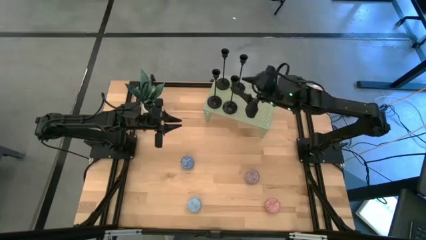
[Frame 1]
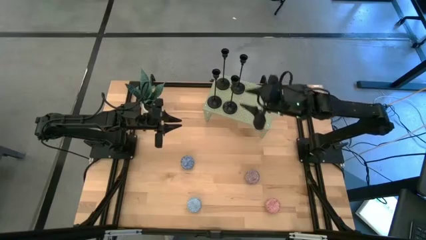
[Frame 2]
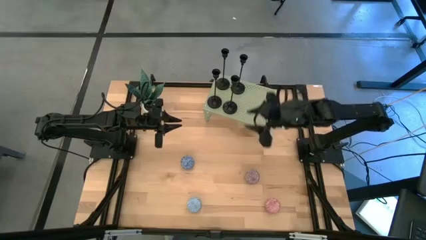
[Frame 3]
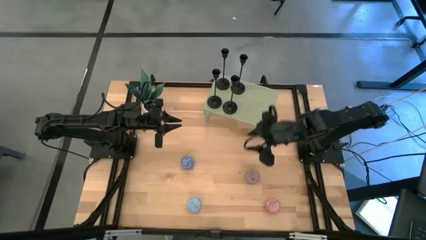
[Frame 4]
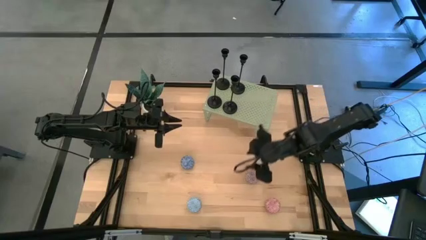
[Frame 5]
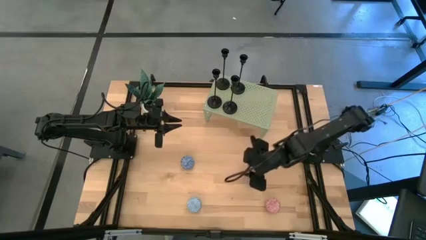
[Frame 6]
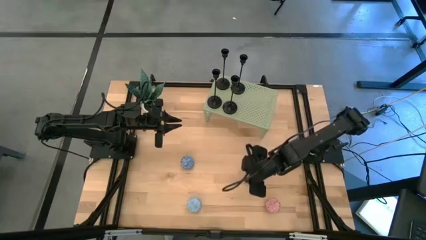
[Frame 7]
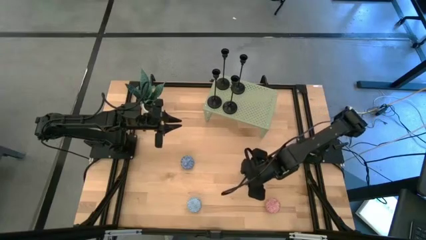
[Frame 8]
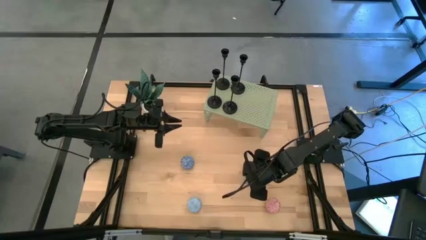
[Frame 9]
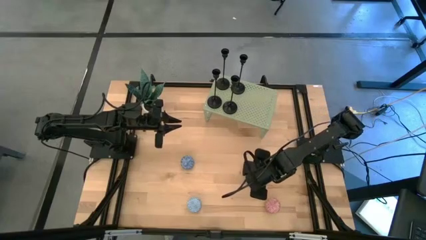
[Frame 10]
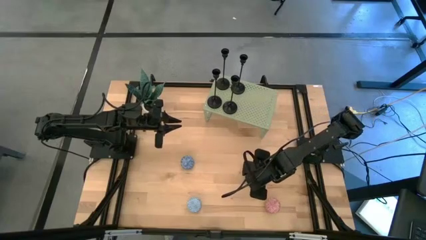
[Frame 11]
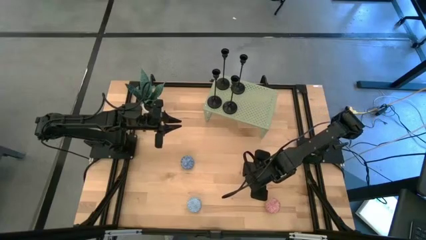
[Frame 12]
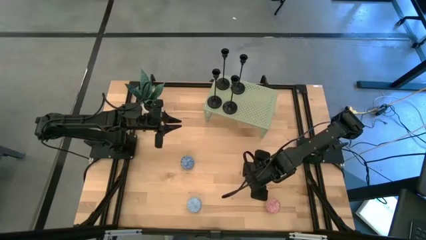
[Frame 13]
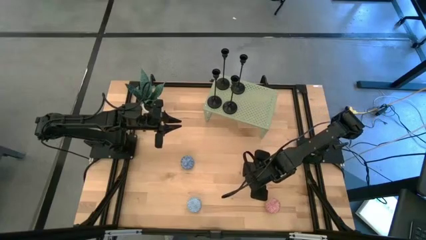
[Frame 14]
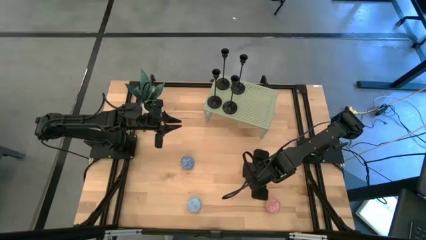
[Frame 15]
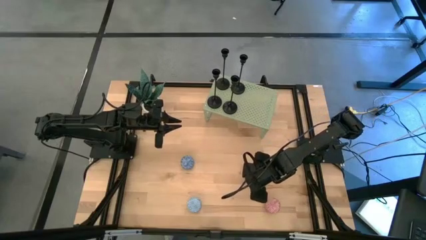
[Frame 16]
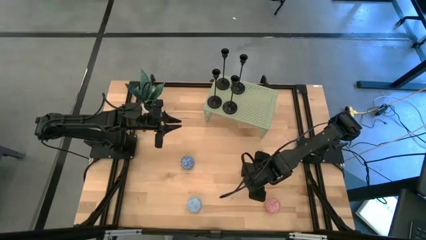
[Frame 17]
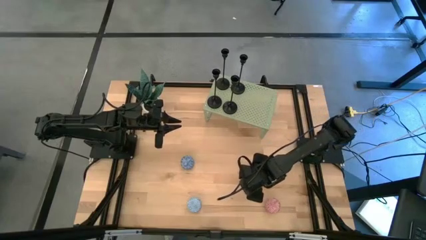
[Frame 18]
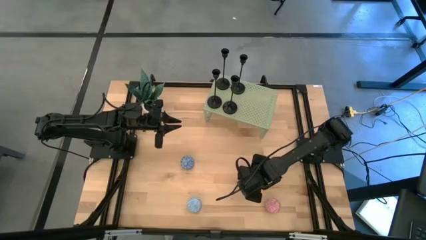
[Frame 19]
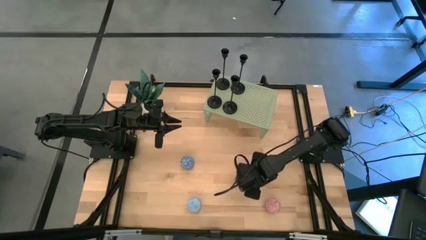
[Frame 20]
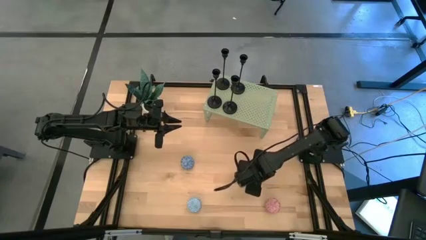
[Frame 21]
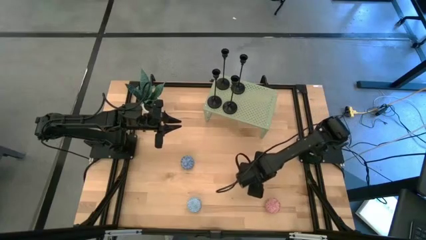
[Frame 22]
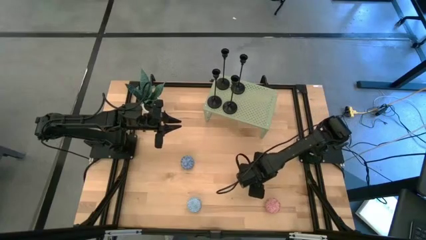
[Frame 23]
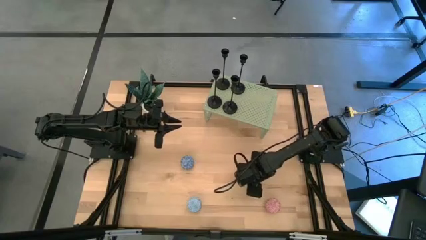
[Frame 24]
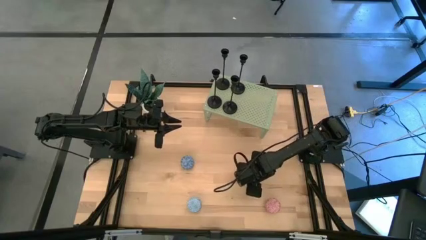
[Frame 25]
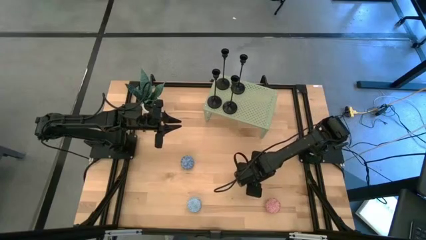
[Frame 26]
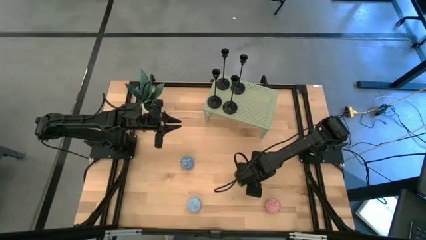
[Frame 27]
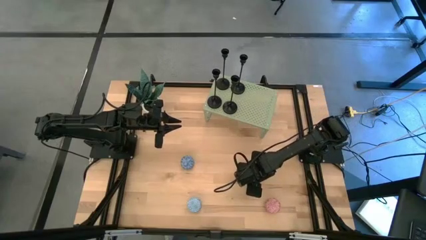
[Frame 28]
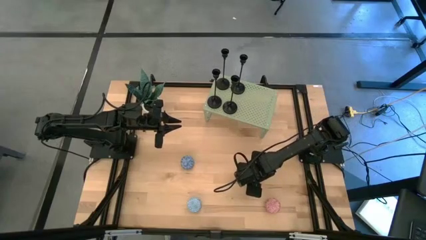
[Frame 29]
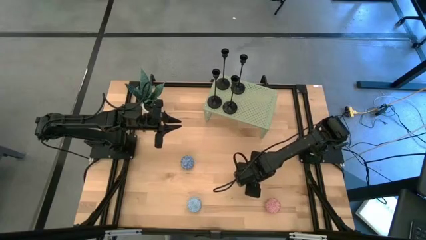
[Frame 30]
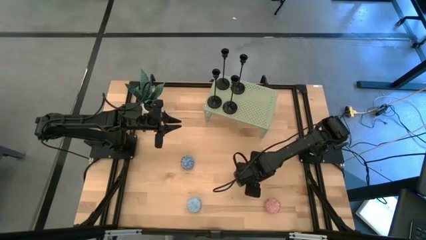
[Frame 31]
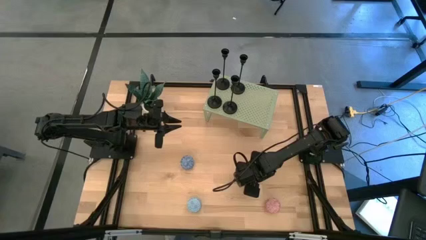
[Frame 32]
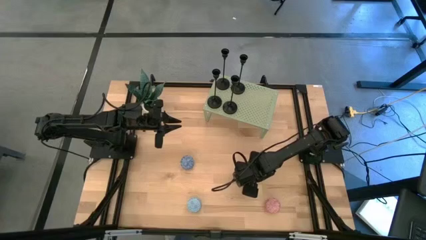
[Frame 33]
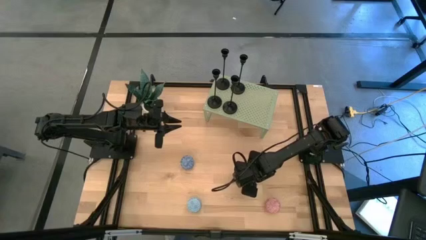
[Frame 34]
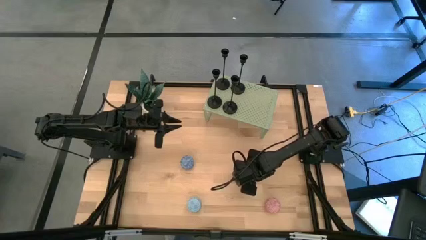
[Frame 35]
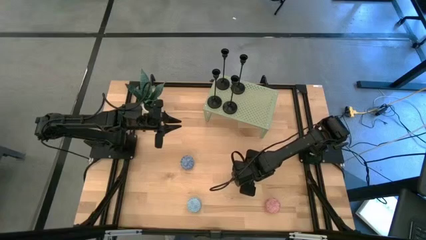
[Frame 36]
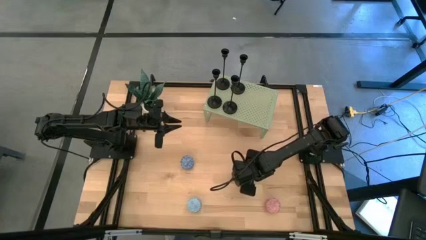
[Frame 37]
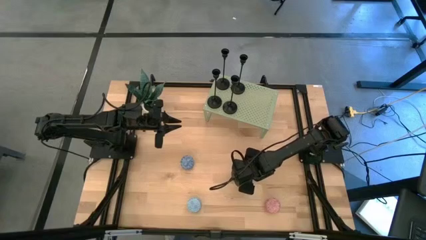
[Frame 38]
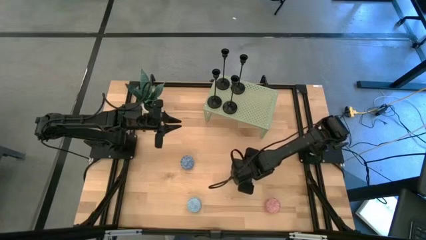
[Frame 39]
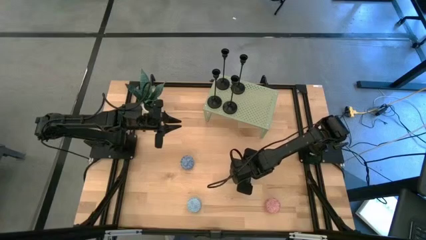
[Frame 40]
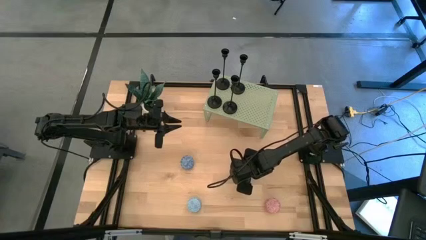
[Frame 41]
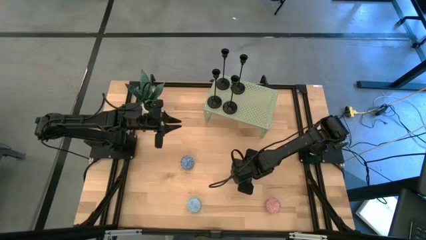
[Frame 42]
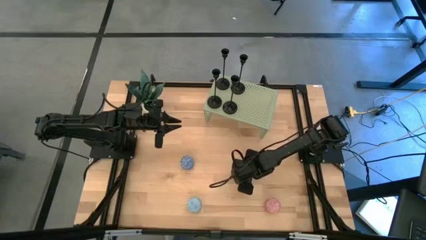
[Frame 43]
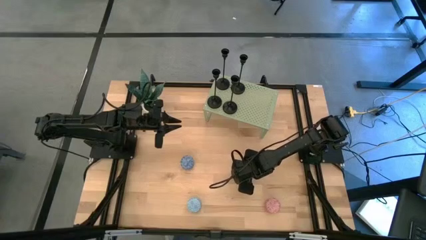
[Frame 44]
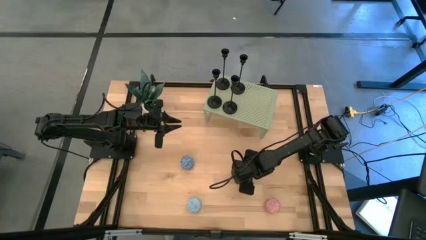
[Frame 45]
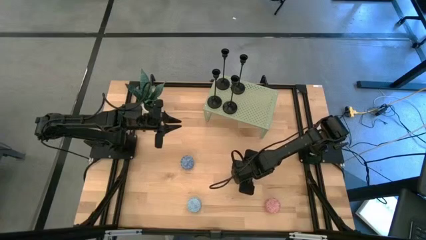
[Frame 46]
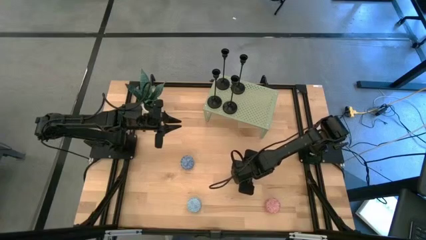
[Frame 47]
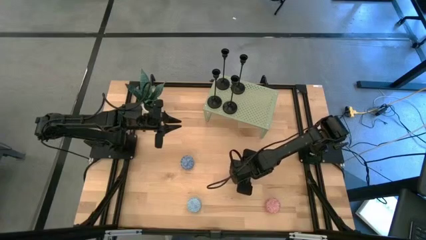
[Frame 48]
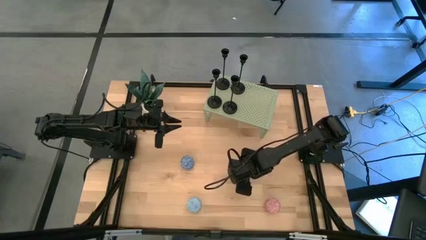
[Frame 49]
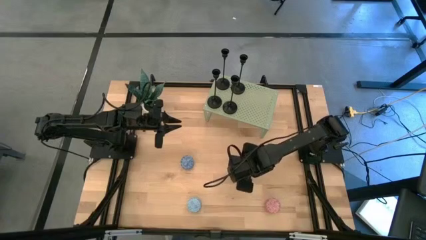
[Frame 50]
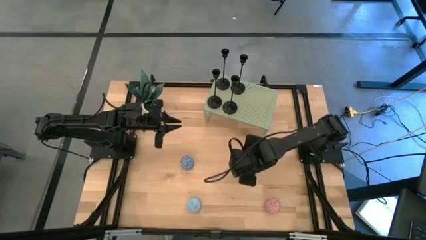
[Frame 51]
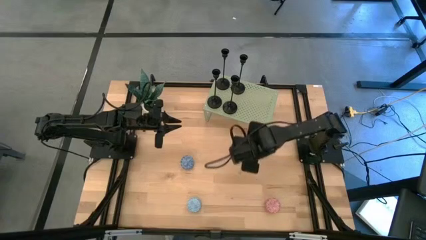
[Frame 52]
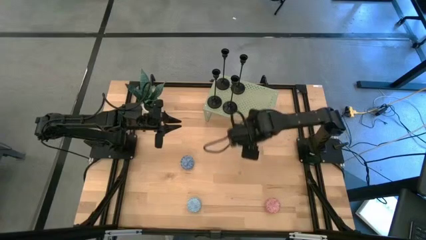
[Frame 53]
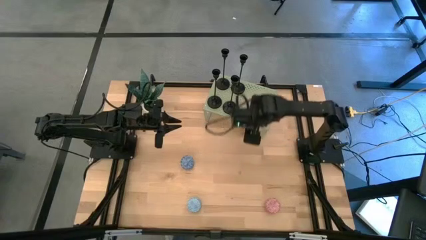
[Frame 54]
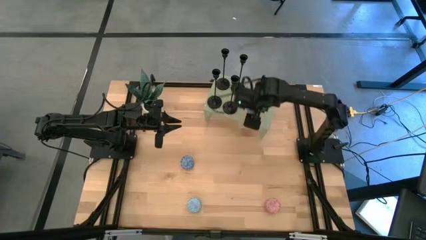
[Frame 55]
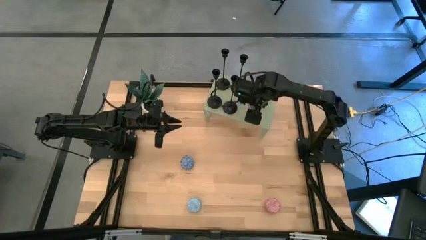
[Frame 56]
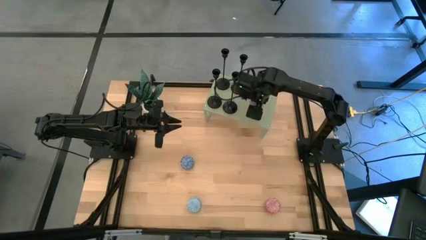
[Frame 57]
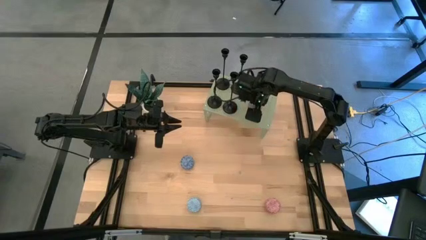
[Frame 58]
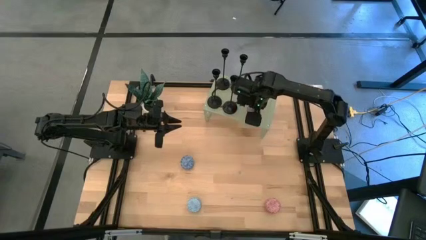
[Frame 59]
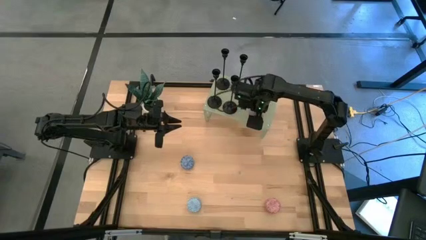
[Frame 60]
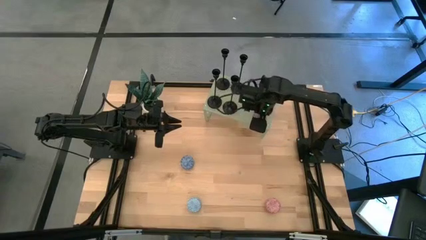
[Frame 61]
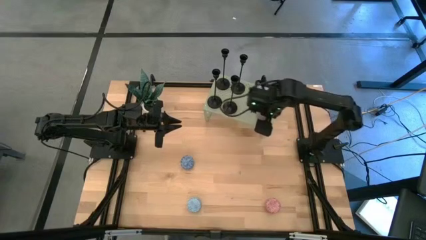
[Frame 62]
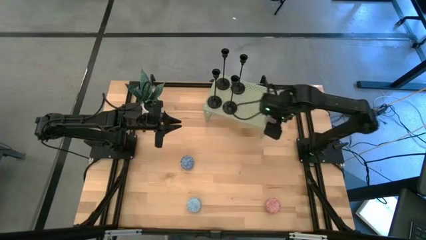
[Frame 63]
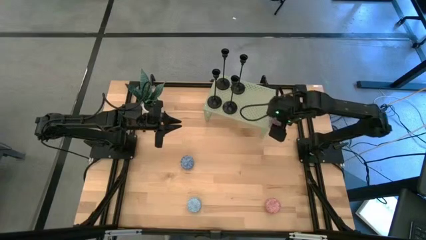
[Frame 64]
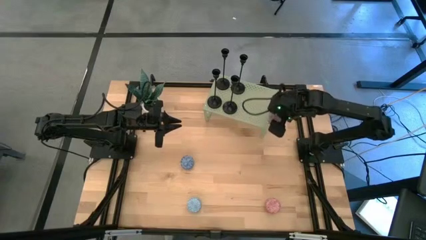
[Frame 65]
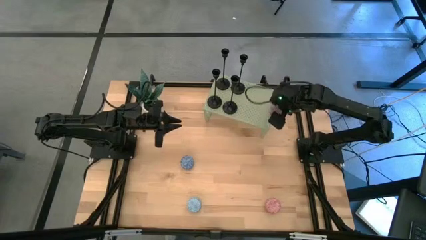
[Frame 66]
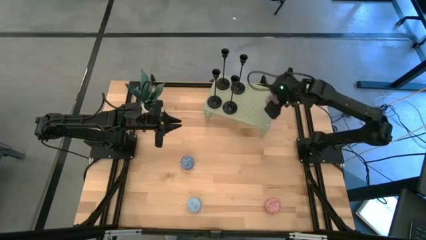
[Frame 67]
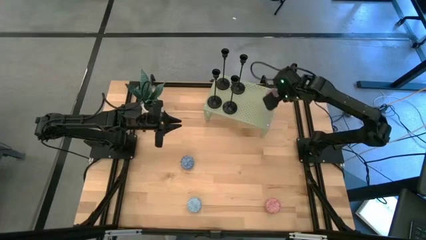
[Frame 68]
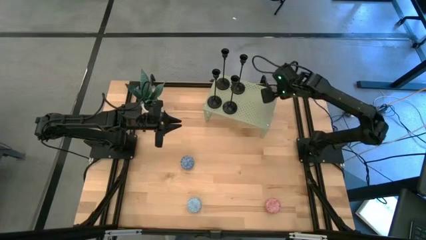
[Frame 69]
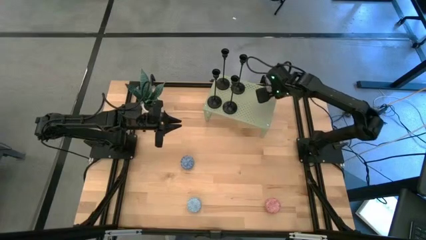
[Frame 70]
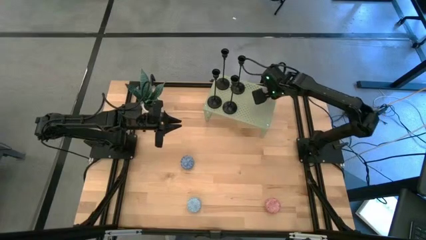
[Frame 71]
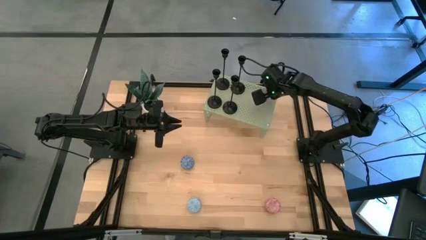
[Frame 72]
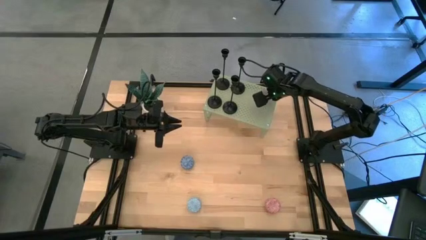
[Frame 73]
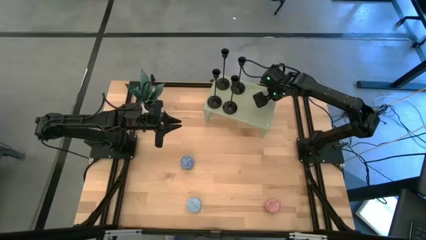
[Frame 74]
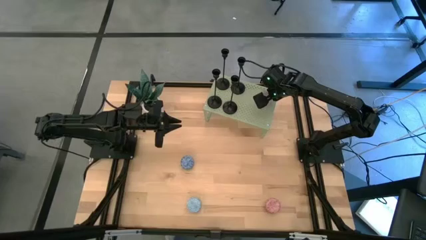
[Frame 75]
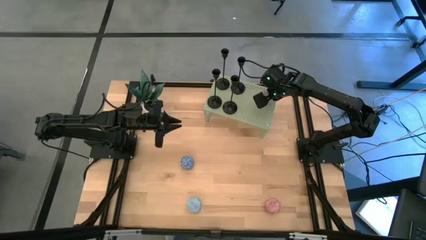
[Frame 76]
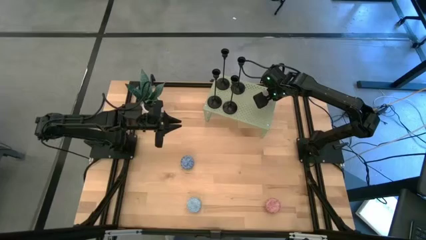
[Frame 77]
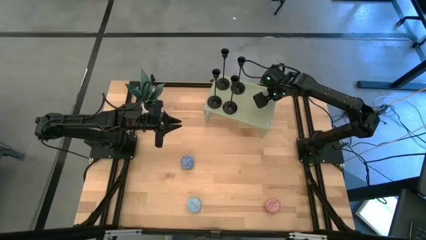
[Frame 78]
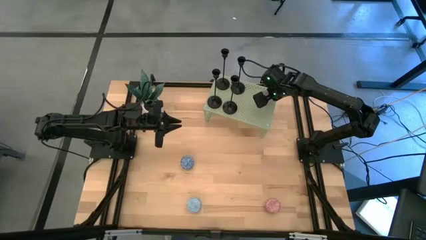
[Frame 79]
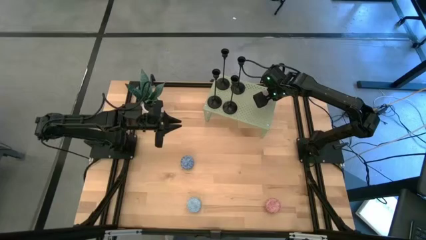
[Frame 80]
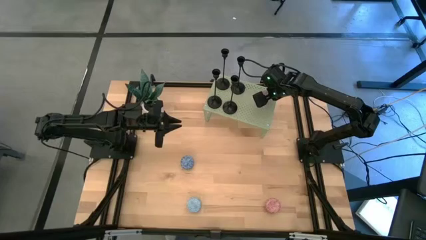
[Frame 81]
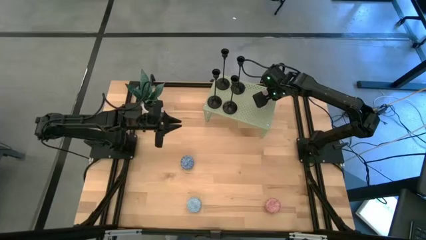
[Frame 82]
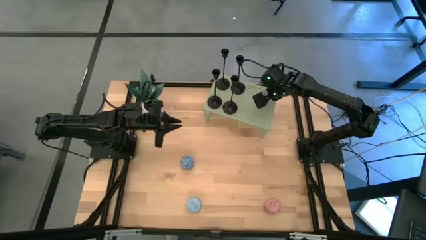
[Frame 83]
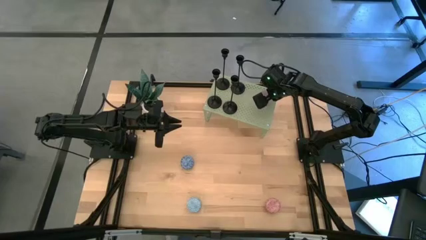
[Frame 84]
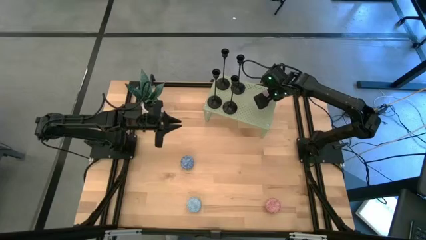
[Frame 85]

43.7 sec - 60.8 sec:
Task: Pick & Place candle stick holders
Put the red scented candle on the shelf
